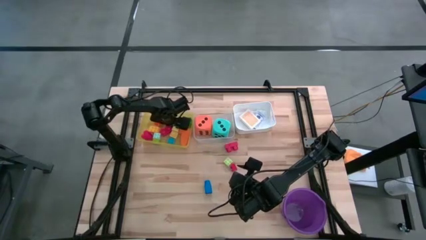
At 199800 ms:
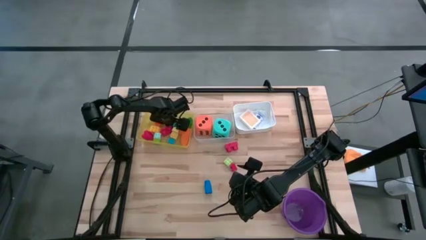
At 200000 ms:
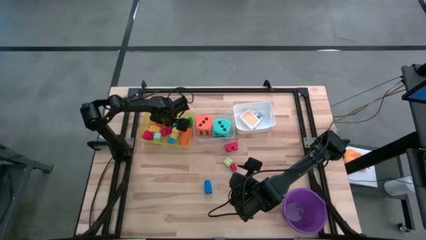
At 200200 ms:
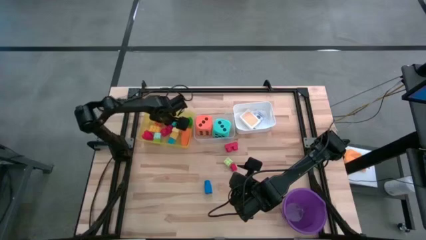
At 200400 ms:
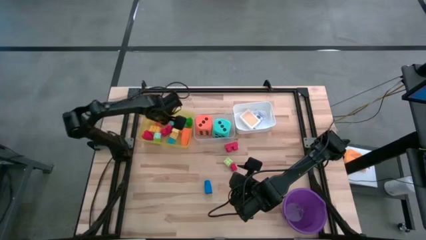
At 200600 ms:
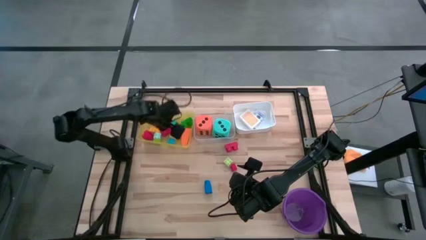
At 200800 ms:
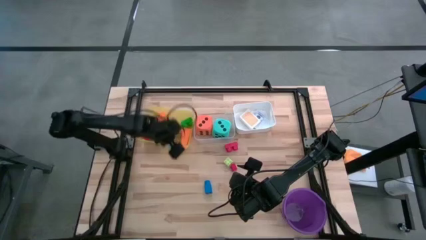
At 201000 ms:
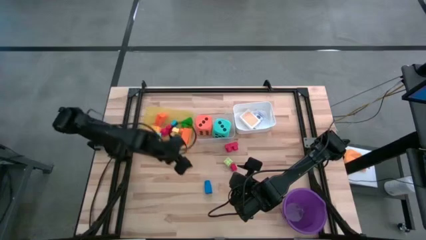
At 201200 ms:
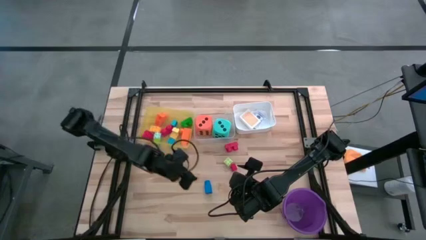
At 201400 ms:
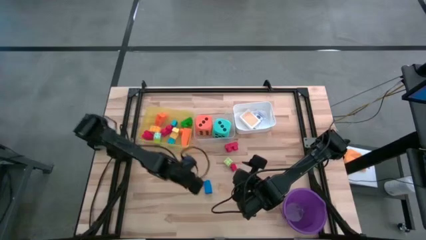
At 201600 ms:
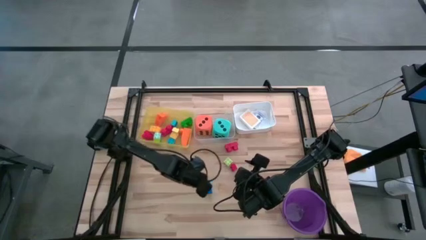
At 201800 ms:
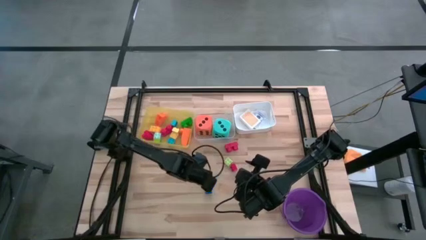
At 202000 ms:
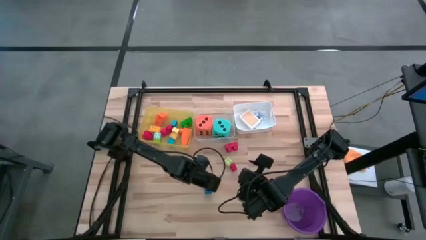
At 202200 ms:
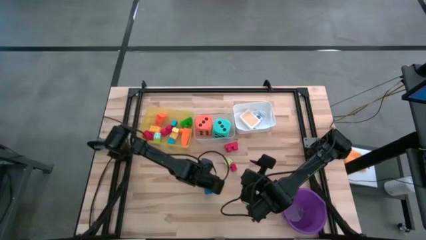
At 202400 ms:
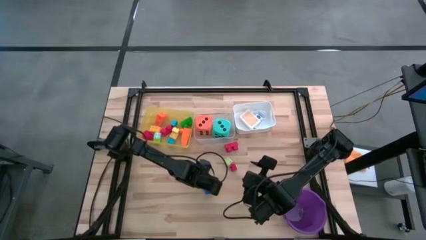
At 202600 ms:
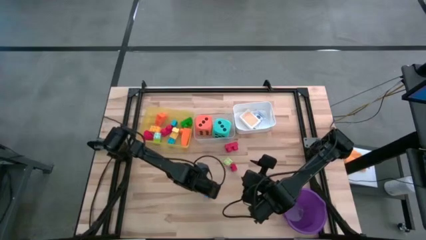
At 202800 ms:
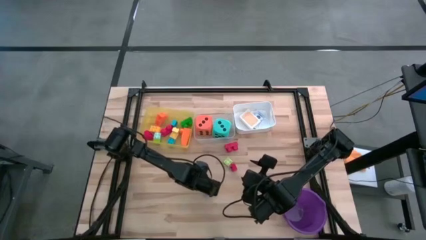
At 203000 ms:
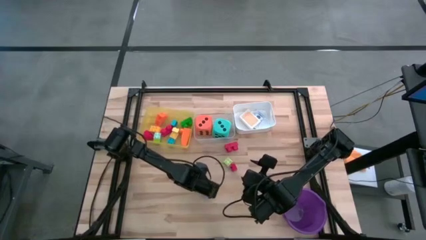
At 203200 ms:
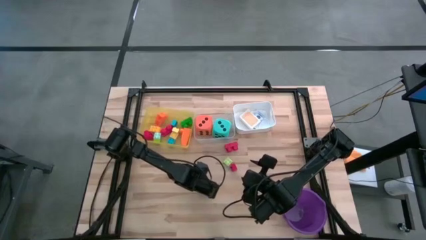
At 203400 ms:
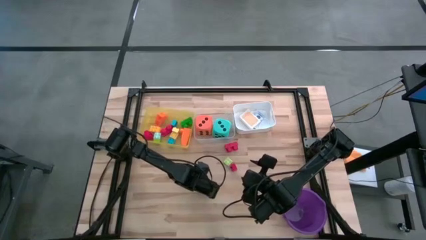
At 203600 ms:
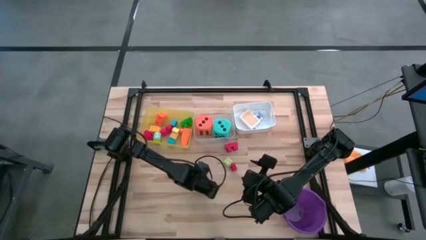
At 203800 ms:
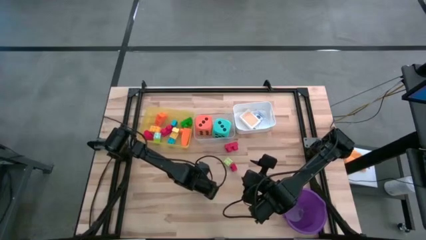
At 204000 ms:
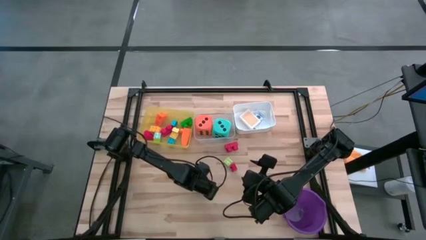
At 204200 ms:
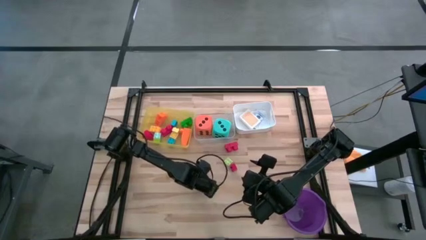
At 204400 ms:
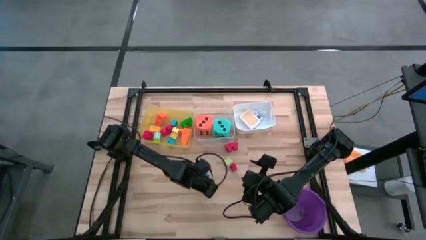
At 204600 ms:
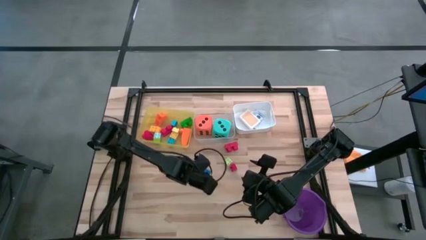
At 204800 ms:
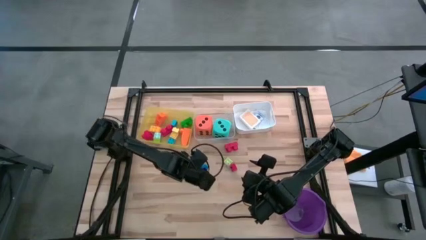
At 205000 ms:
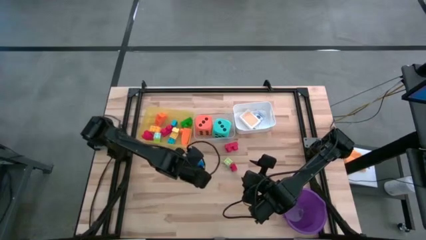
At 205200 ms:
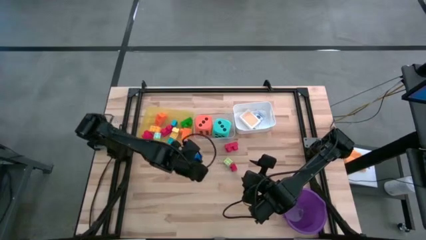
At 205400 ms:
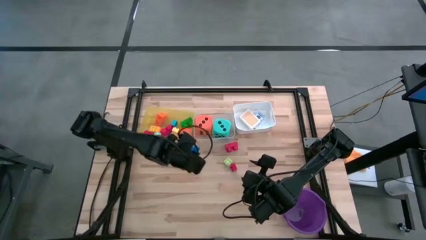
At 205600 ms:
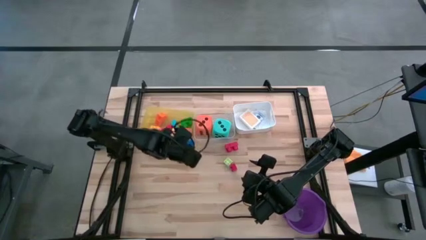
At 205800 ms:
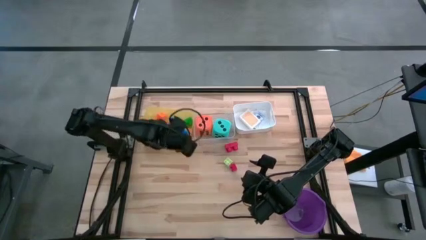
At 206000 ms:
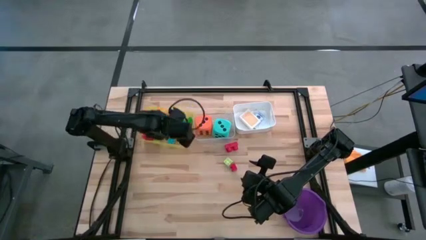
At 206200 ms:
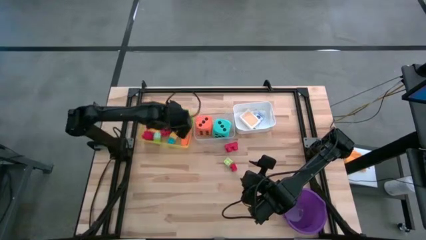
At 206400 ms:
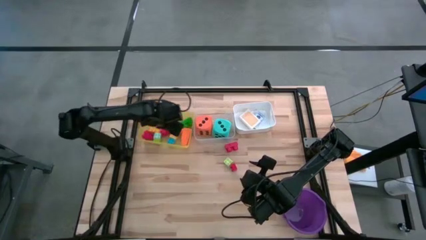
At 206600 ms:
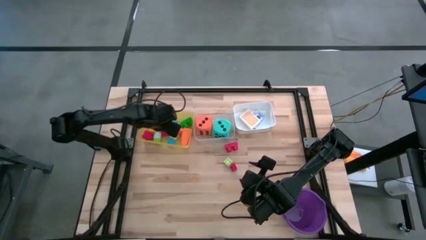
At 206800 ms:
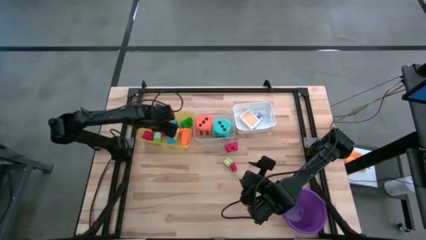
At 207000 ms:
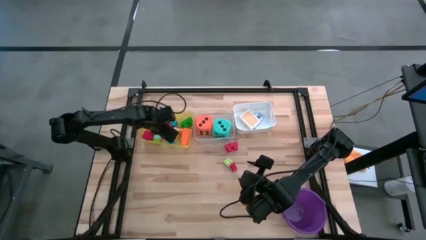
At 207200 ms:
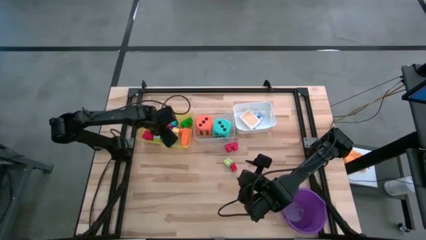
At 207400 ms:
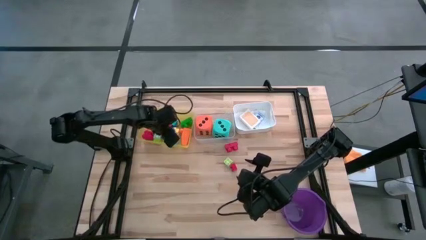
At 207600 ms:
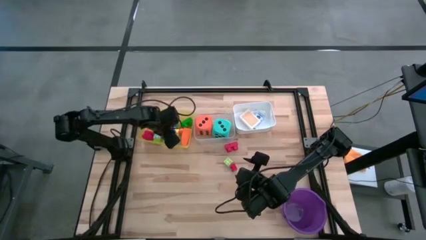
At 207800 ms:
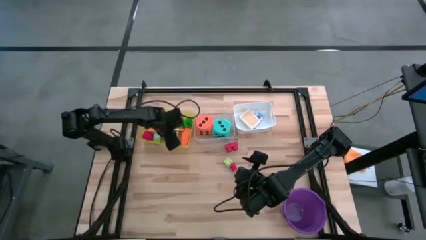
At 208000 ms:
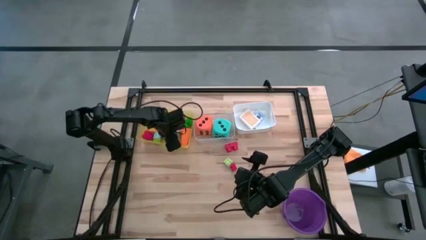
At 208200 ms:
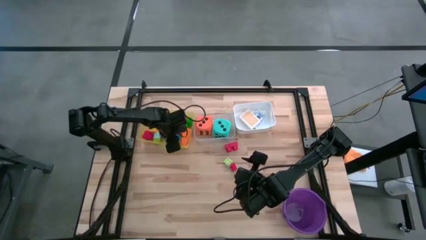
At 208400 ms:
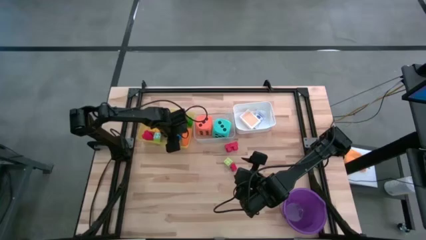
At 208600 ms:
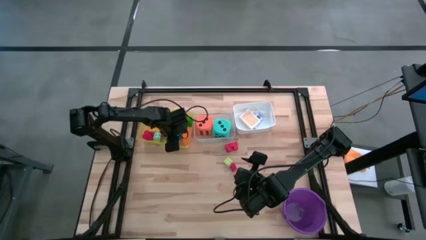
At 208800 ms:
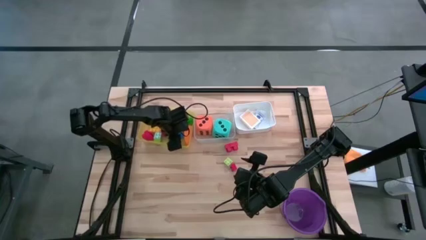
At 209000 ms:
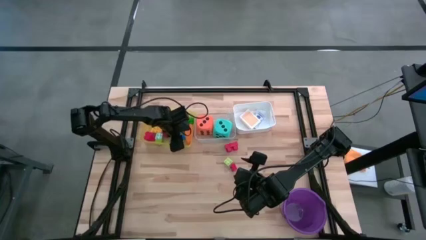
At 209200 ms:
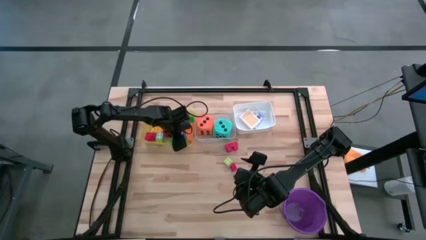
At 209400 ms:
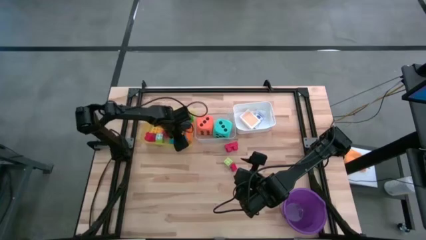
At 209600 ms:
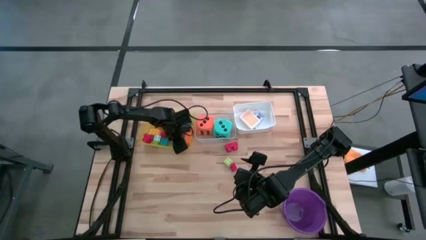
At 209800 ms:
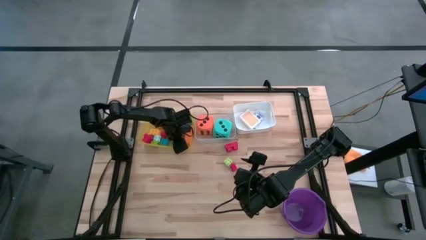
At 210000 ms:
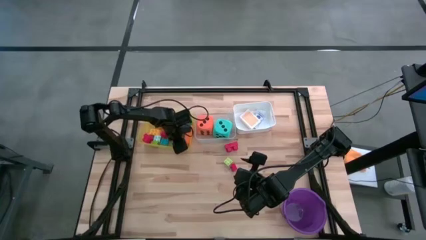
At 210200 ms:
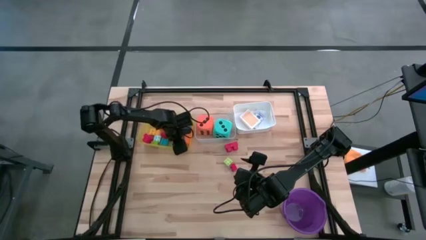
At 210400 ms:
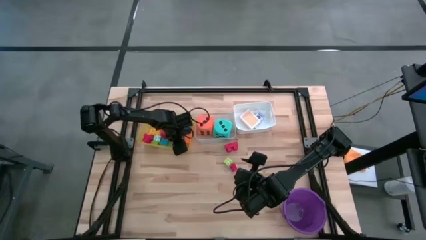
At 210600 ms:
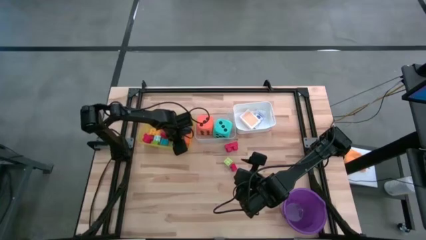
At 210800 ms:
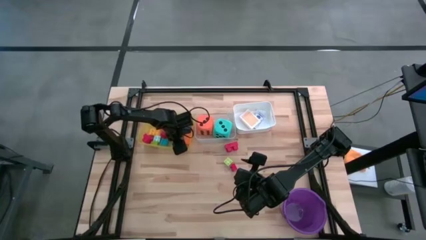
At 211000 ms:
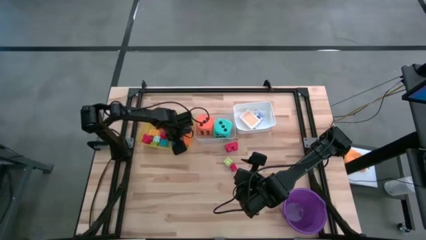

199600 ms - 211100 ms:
Task: Pick & Place Toys
Put the blue game piece into the yellow bin

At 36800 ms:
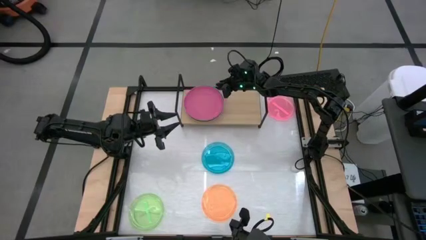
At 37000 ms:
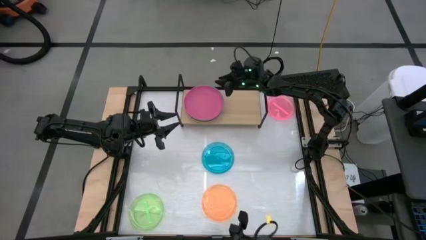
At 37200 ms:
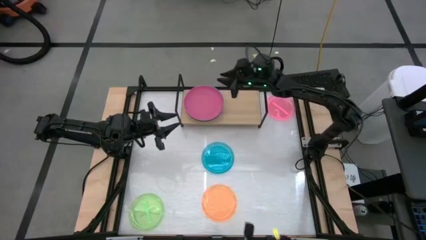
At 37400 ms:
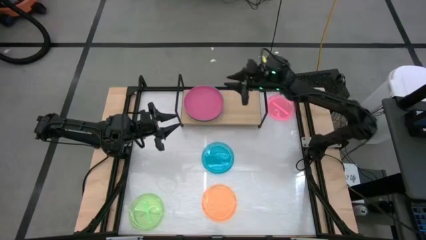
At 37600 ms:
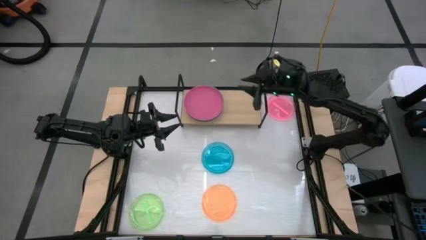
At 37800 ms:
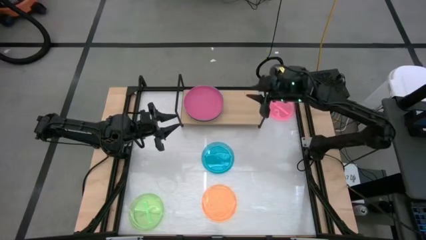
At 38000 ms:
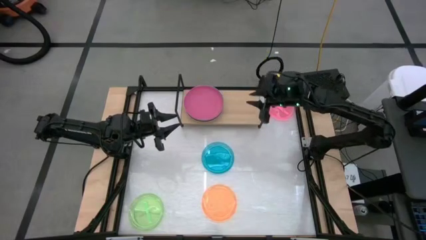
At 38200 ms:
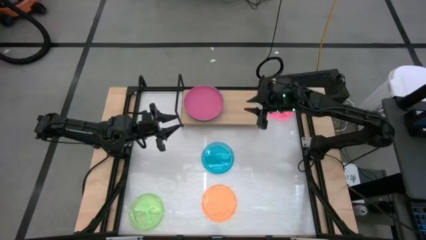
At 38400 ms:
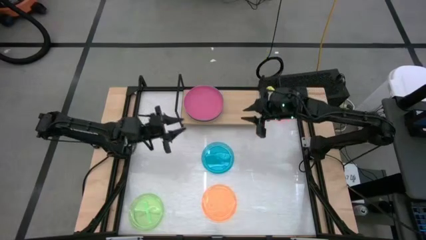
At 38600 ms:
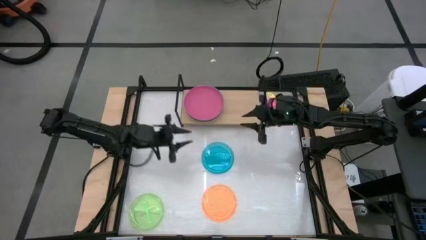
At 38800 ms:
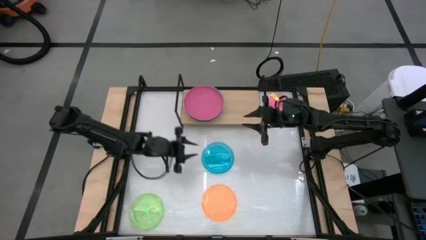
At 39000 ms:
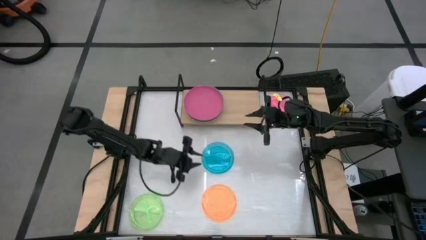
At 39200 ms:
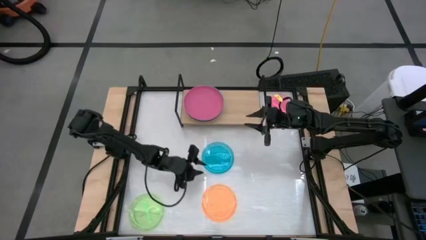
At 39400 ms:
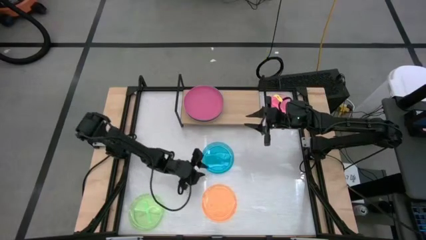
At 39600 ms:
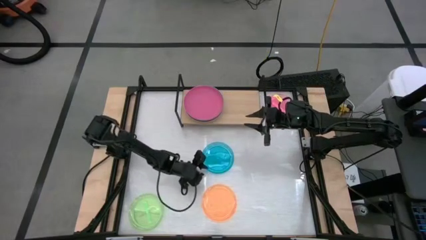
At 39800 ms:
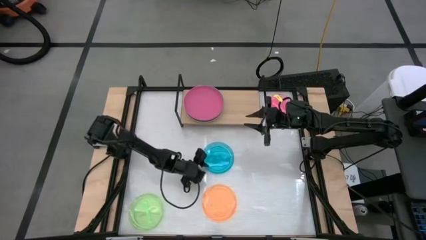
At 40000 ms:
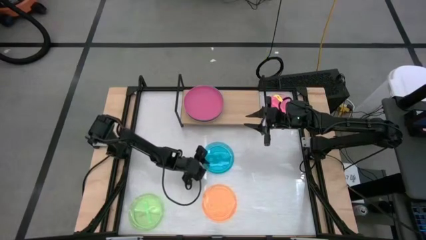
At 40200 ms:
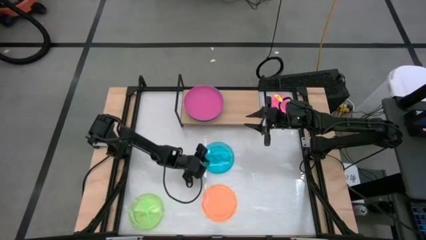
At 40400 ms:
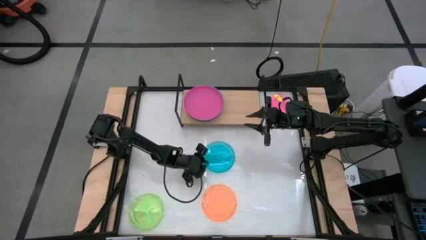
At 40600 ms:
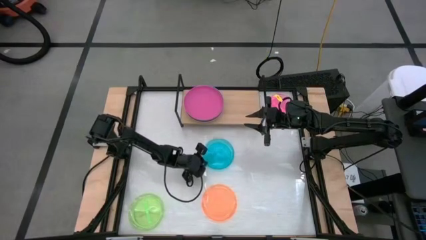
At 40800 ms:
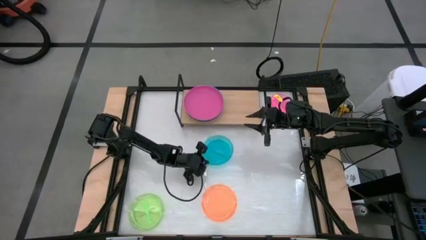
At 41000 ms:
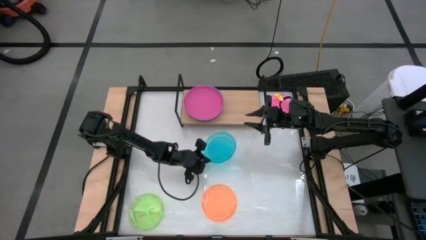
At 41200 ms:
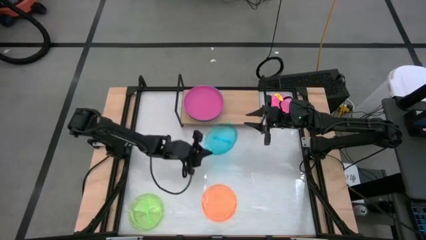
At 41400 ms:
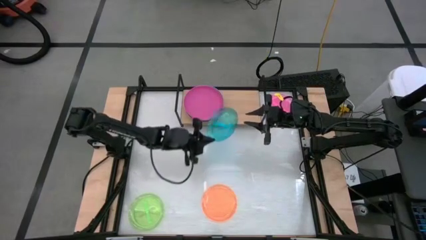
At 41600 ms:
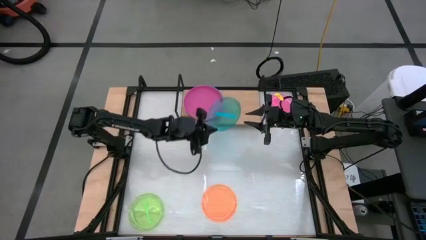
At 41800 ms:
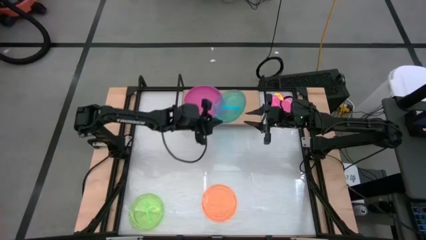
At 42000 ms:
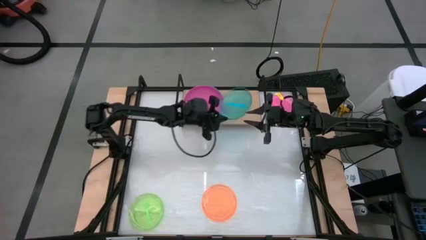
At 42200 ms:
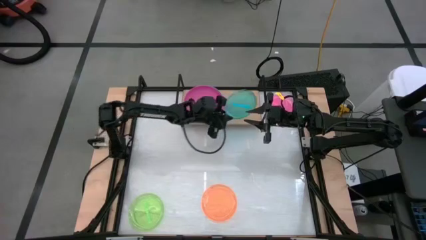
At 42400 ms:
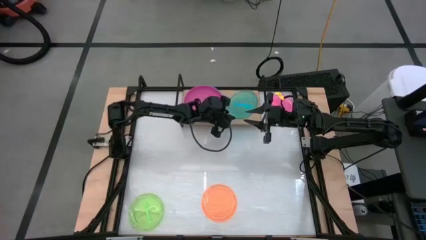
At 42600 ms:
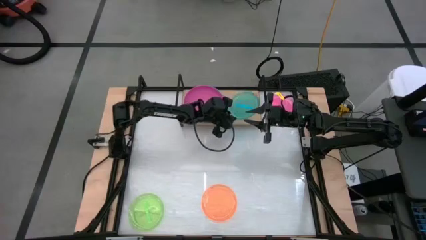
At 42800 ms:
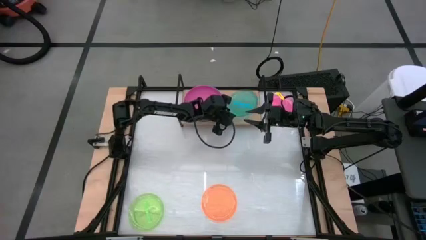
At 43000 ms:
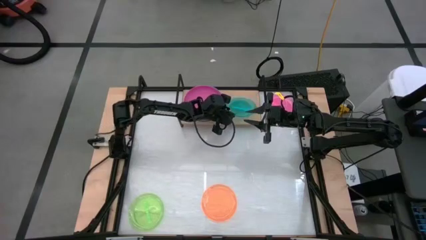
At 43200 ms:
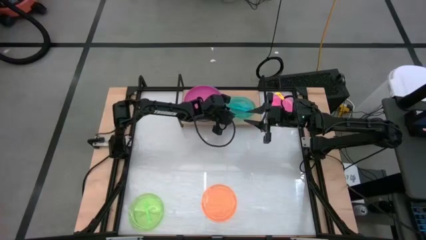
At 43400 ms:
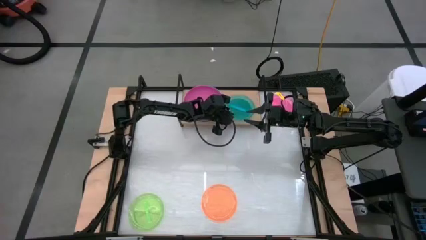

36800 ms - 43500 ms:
Task: Place and stack plates onto a shelf
Put the transparent sky blue plate on the shelf
